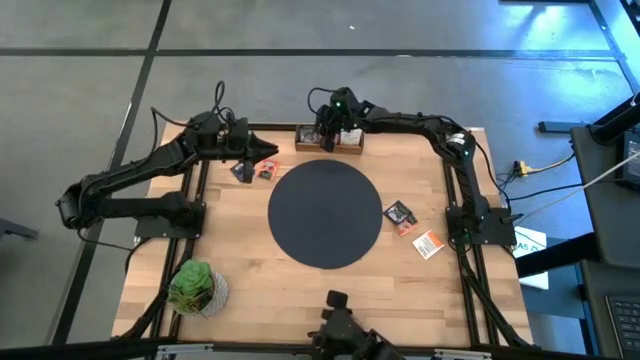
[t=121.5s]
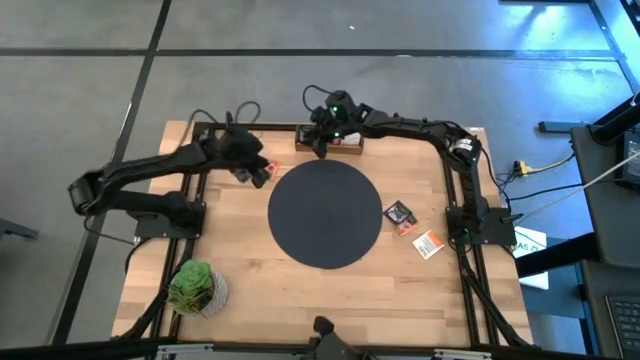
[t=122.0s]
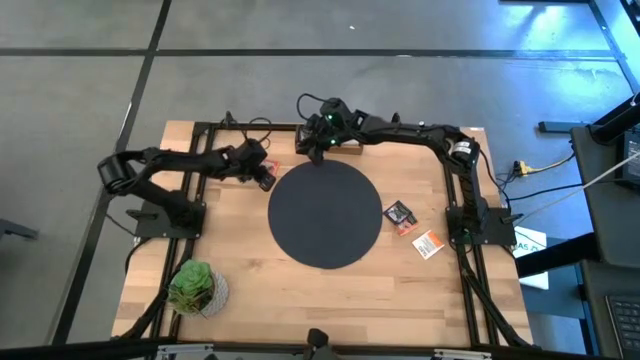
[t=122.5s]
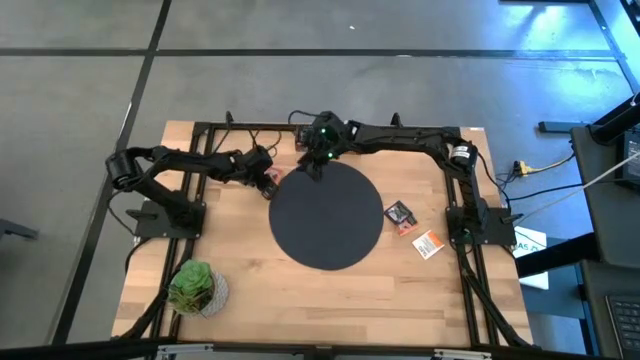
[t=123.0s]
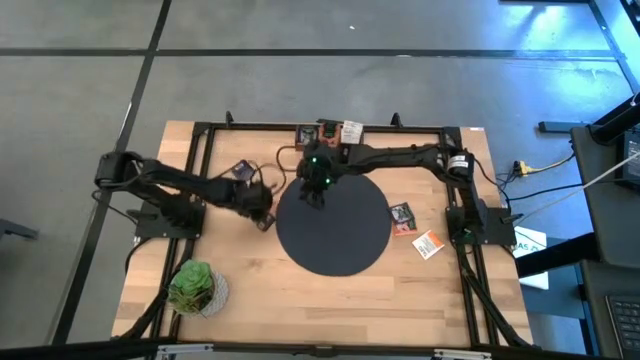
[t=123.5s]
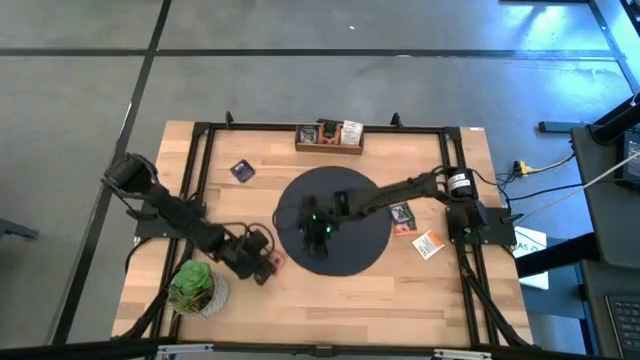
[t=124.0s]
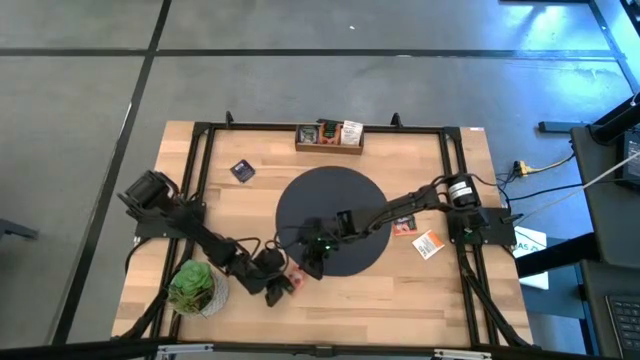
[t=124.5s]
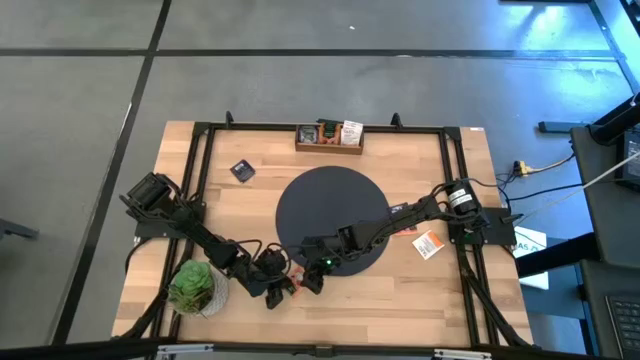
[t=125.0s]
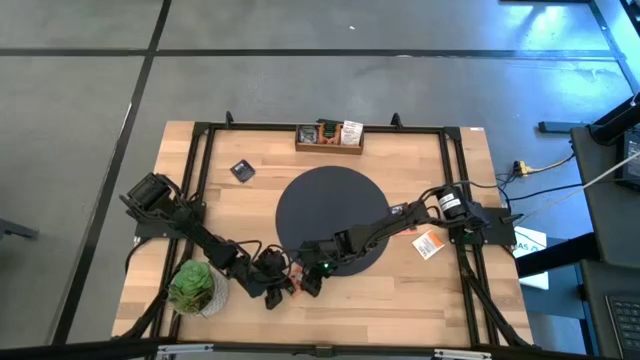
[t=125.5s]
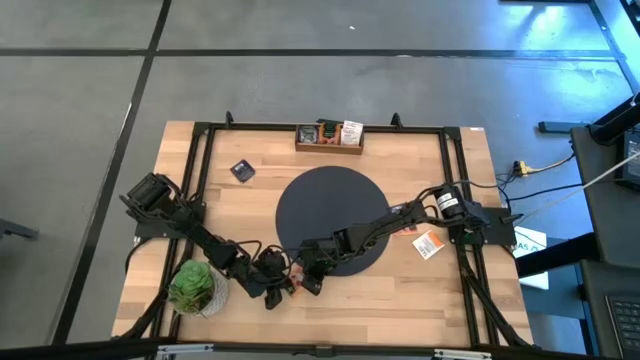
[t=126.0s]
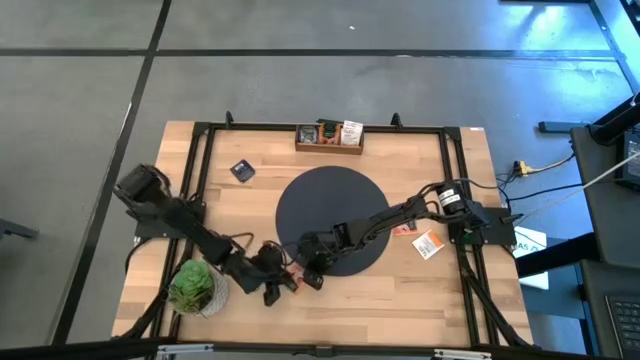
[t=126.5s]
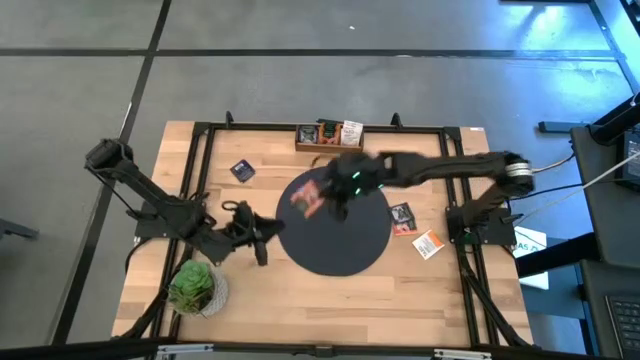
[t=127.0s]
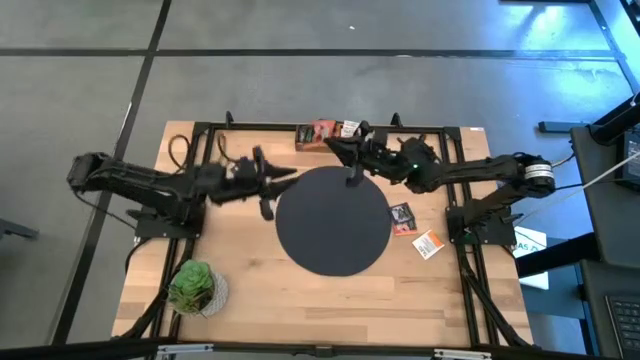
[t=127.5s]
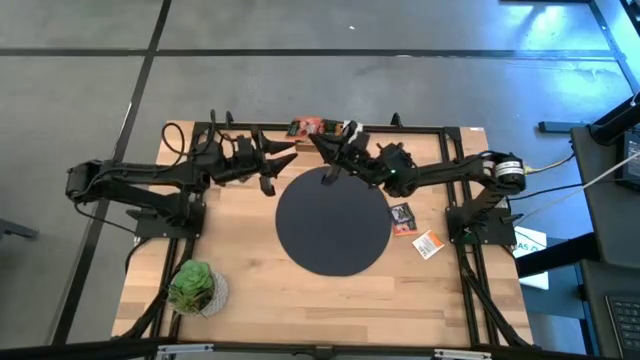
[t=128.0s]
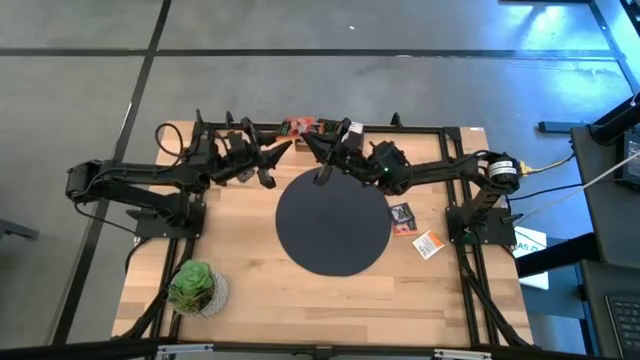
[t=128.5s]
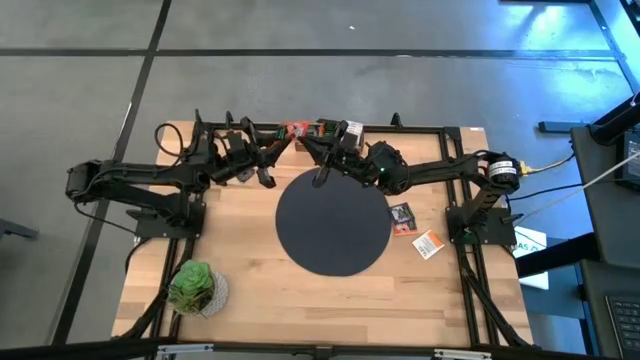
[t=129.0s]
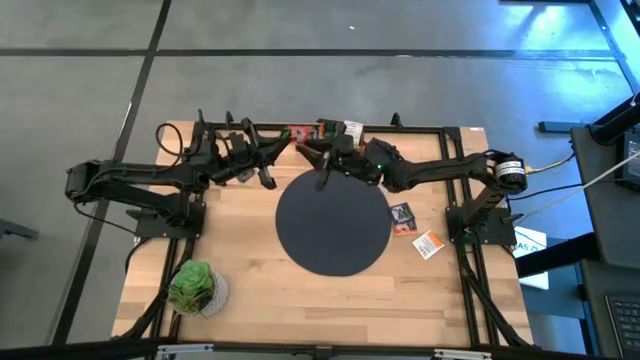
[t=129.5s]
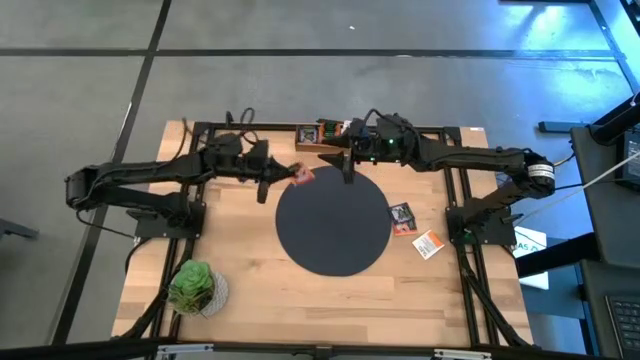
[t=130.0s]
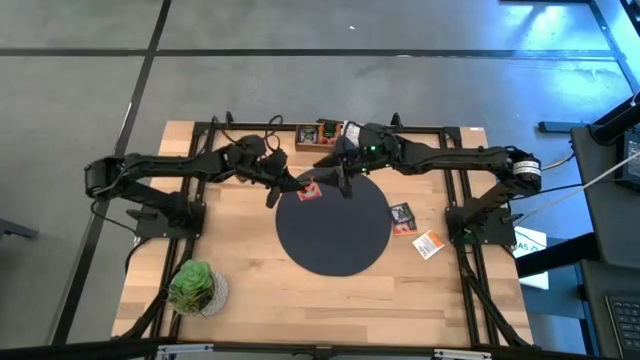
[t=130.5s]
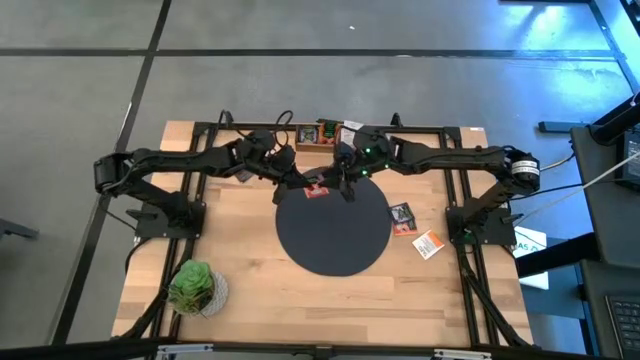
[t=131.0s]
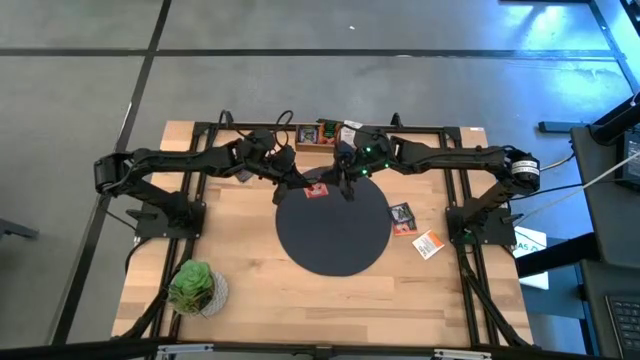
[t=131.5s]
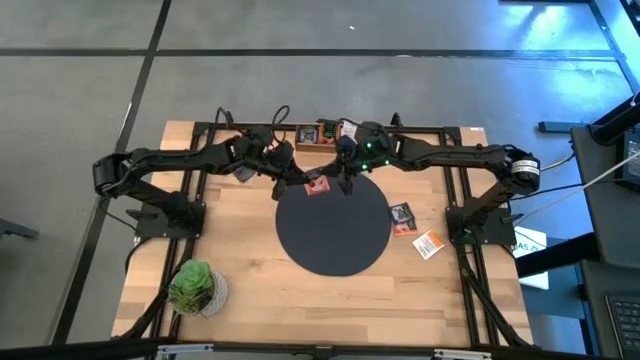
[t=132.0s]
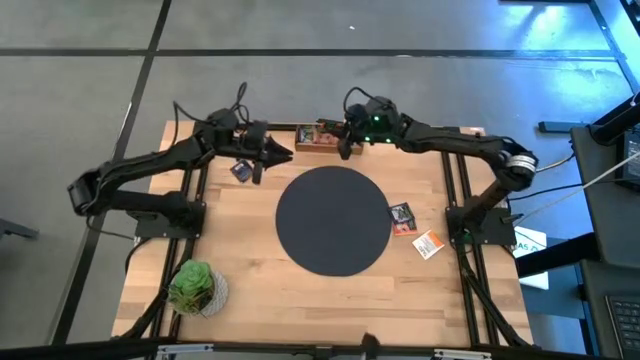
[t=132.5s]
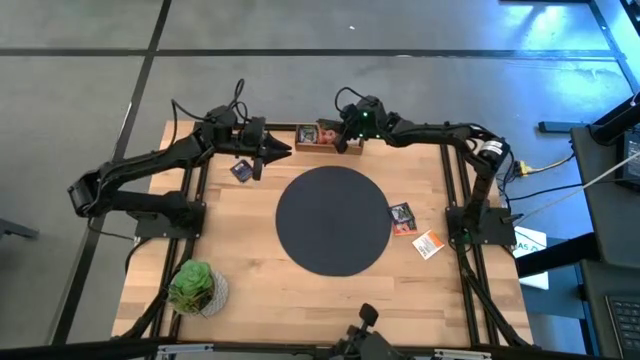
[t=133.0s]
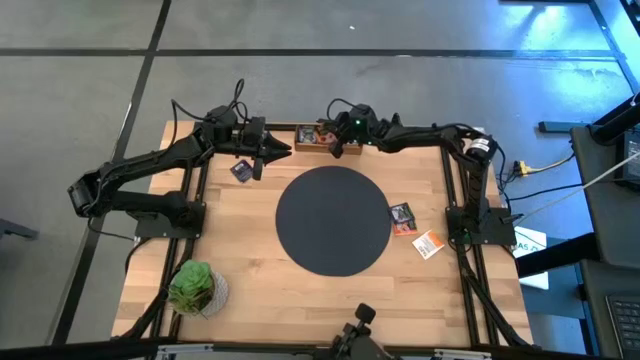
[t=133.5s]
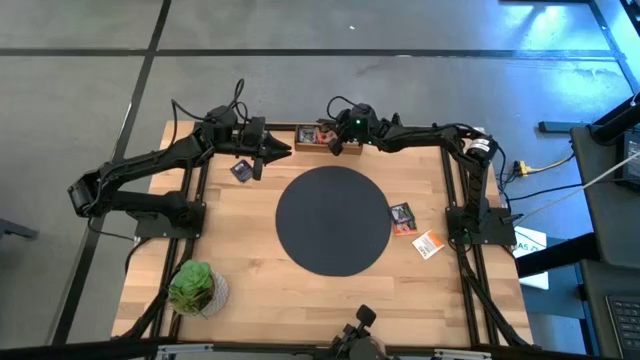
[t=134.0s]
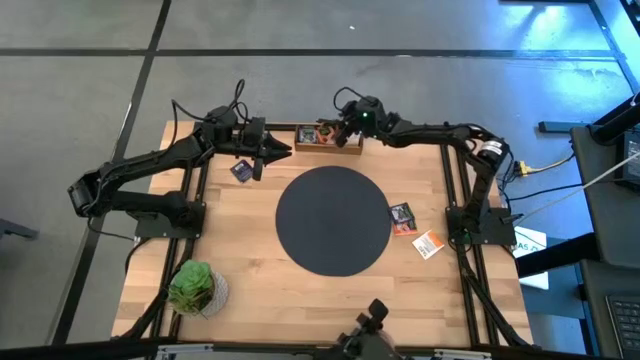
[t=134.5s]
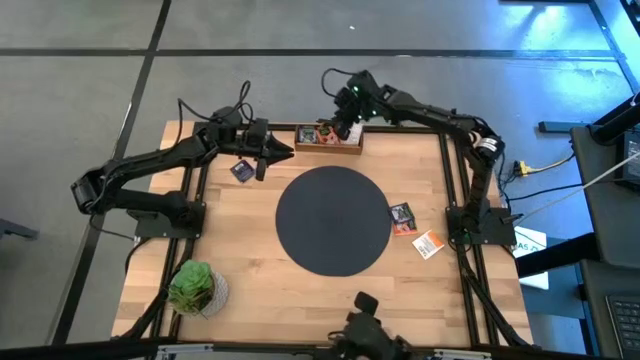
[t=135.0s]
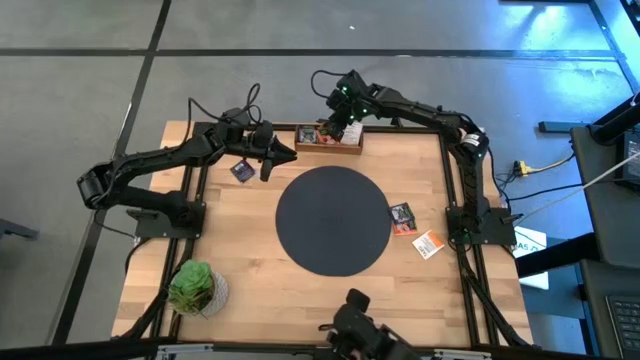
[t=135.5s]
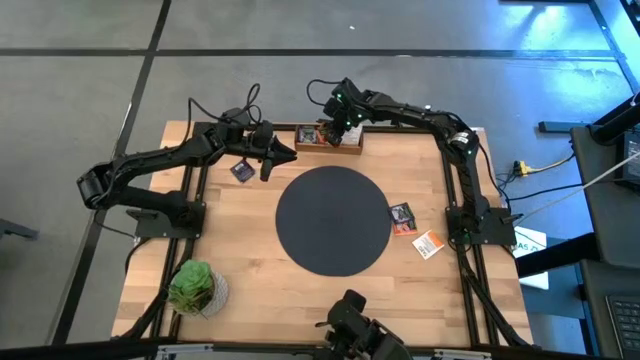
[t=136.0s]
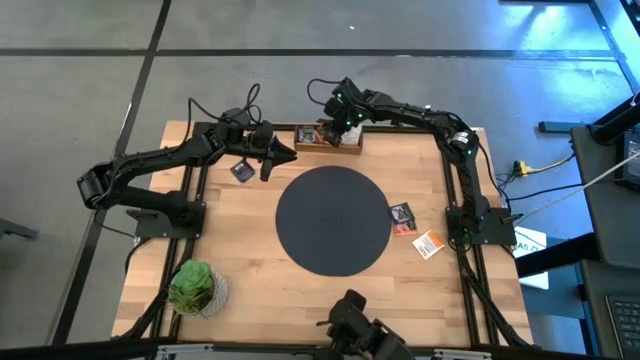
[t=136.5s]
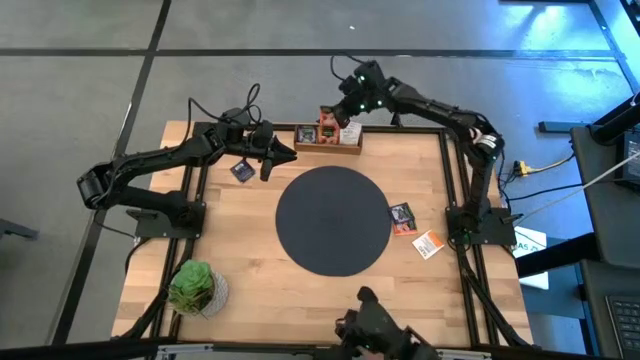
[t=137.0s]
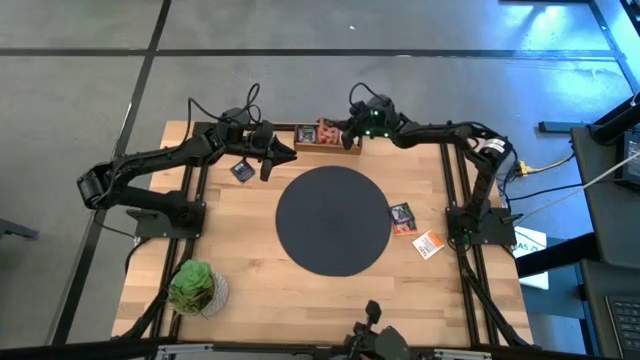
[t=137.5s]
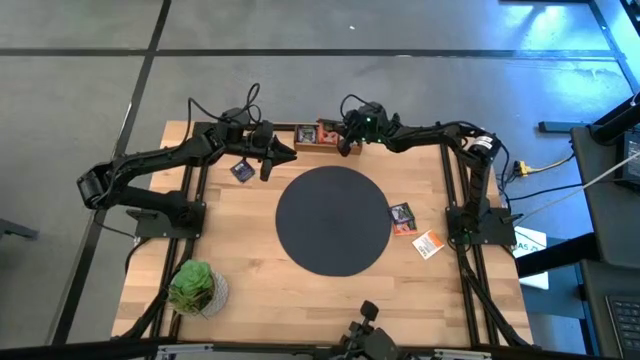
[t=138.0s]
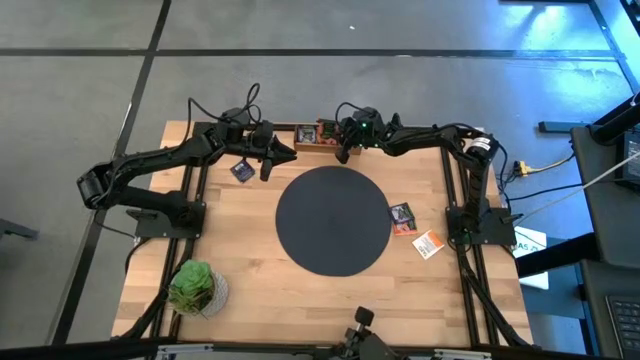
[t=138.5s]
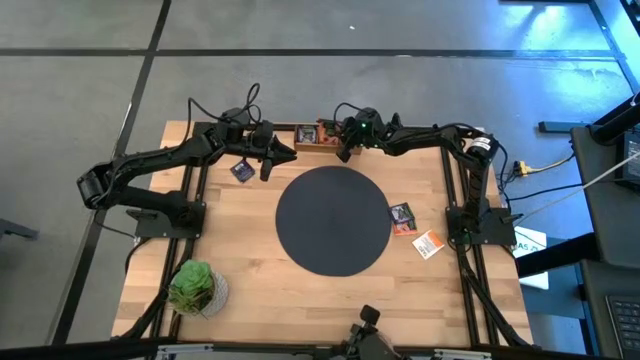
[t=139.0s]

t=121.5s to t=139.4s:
Task: Pick & Place Tea
Put the orange tea bag into the middle section of the wooden organizer

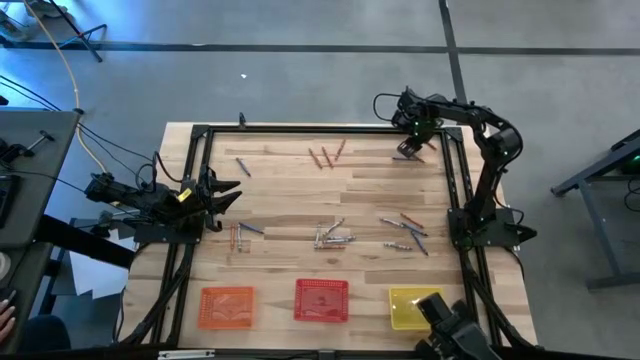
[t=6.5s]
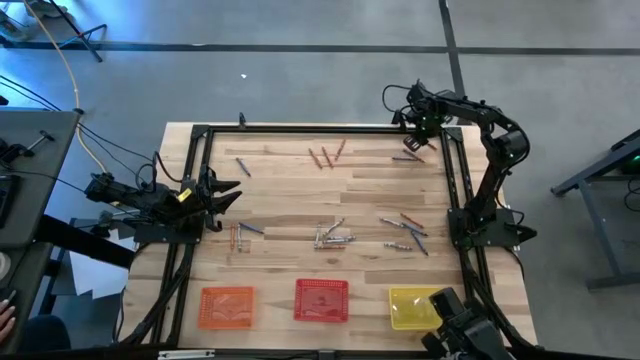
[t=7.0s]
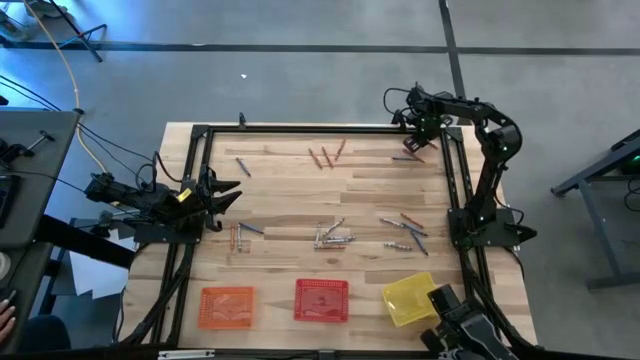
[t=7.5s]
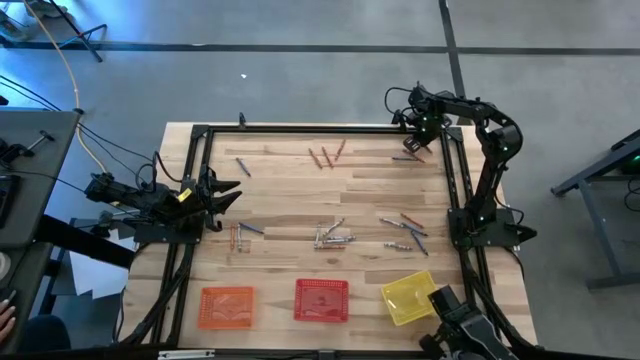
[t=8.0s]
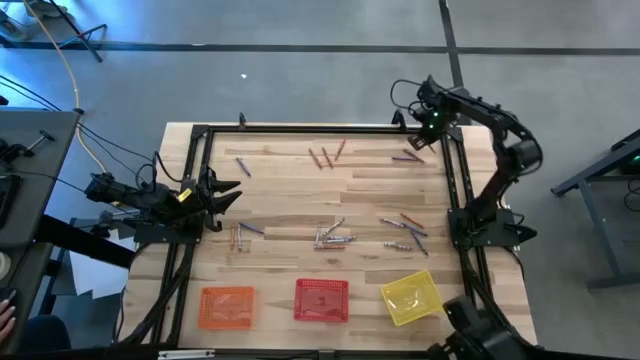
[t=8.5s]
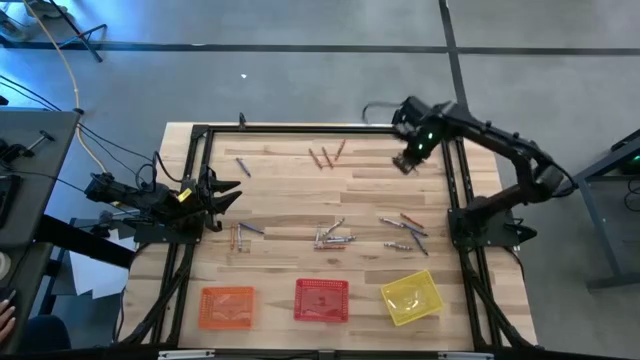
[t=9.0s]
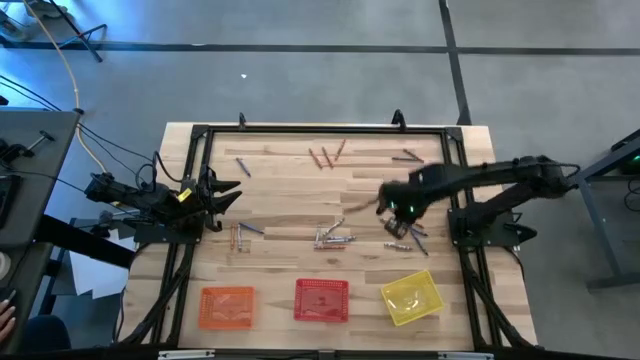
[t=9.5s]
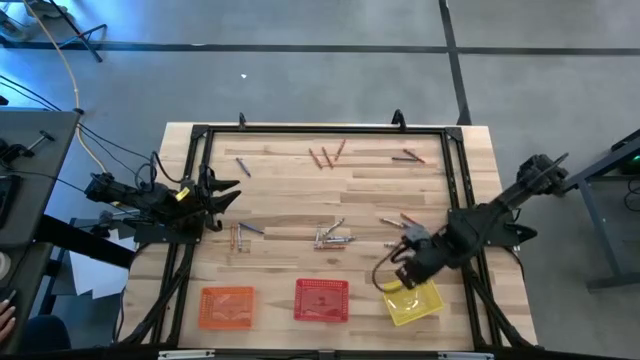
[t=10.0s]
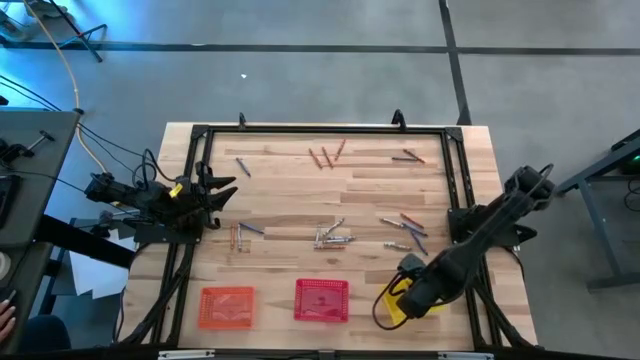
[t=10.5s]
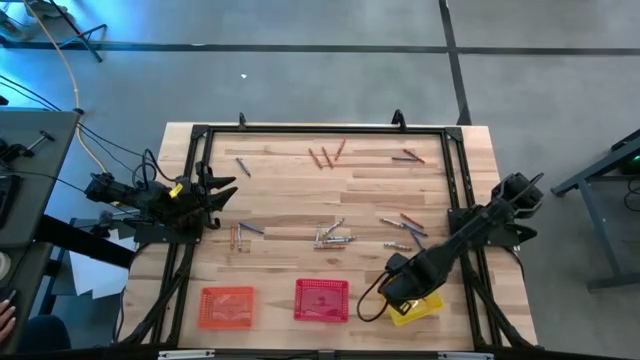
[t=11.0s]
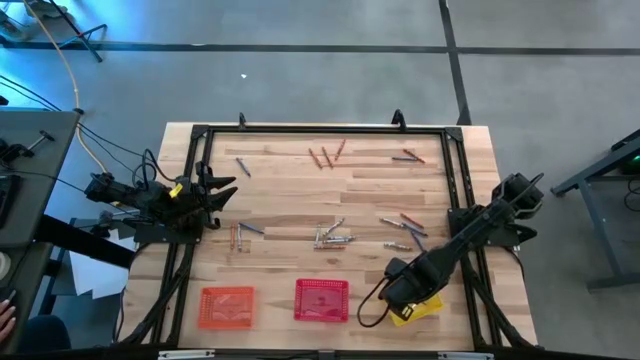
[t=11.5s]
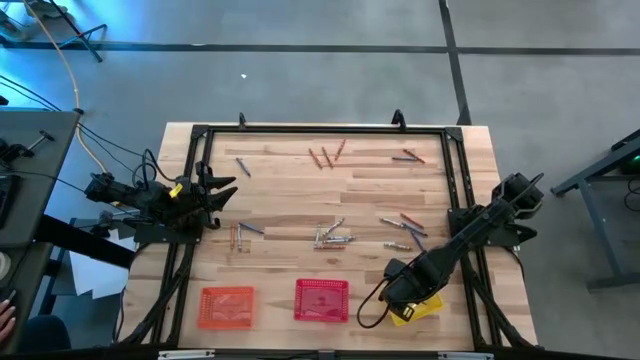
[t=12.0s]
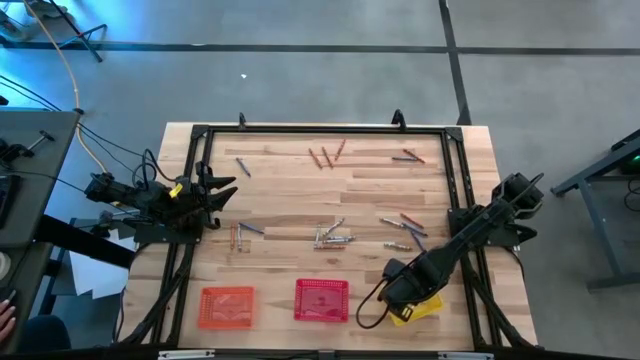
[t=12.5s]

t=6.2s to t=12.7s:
Task: Sort crayons
Put the orange crayon into the yellow bin
